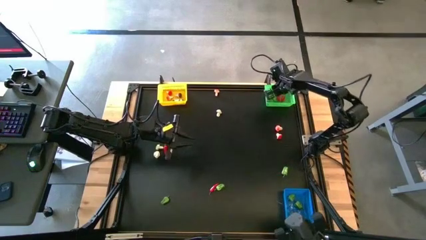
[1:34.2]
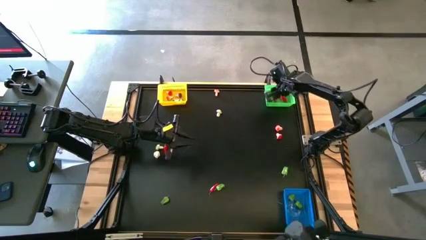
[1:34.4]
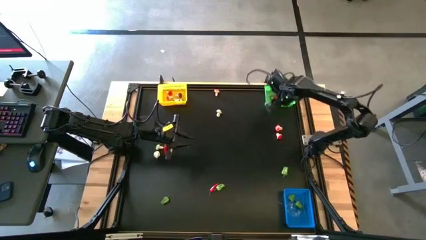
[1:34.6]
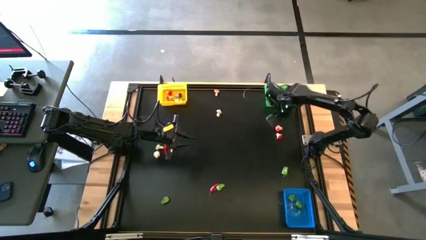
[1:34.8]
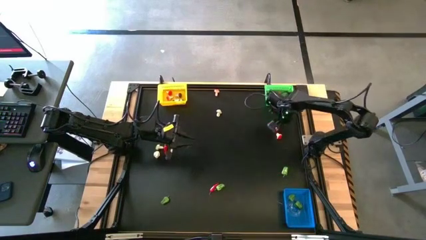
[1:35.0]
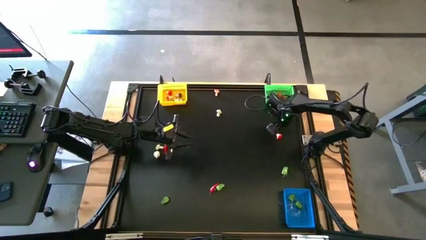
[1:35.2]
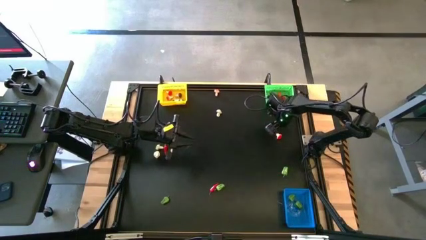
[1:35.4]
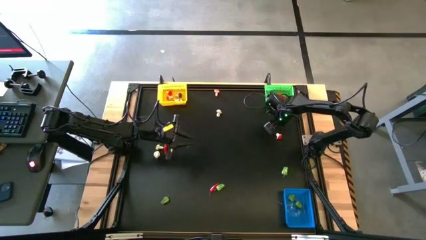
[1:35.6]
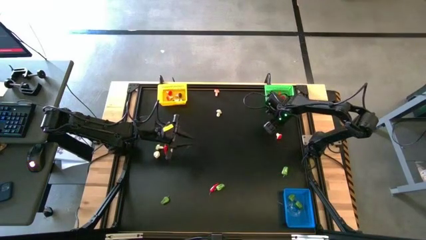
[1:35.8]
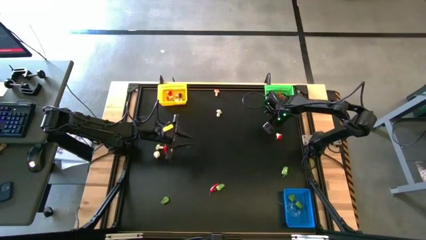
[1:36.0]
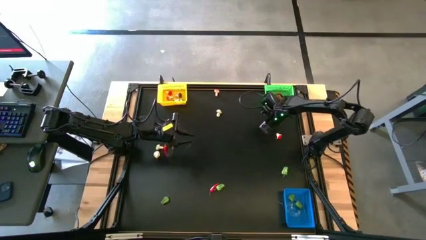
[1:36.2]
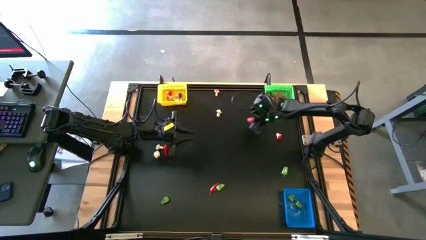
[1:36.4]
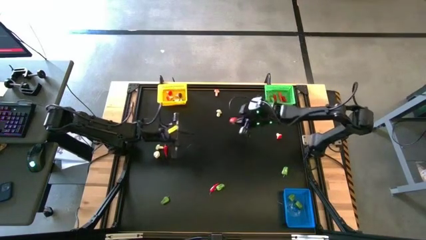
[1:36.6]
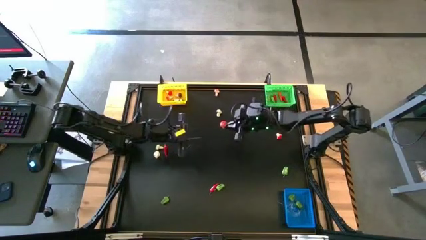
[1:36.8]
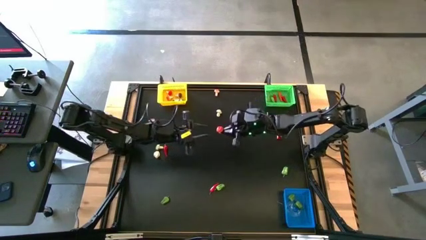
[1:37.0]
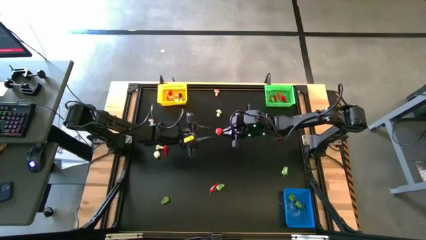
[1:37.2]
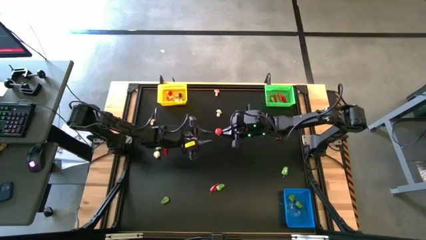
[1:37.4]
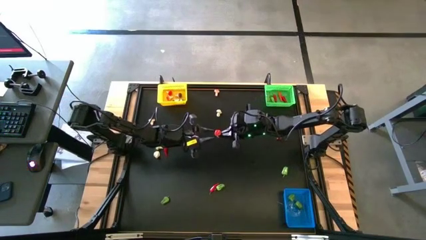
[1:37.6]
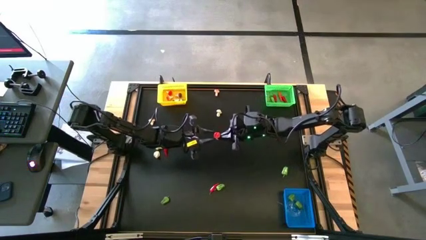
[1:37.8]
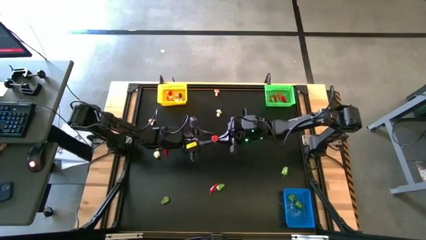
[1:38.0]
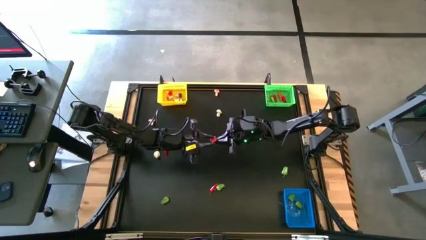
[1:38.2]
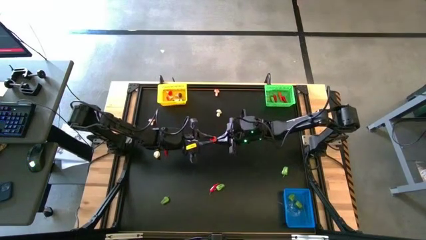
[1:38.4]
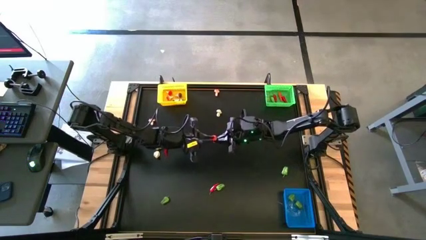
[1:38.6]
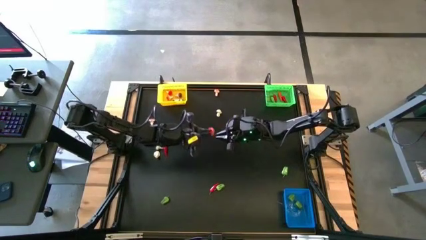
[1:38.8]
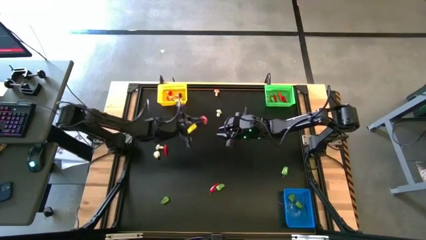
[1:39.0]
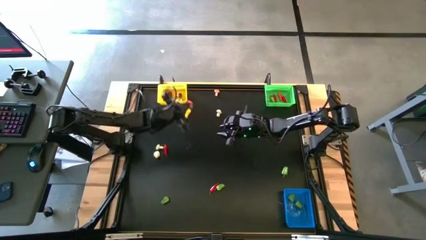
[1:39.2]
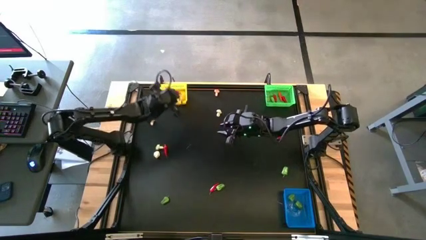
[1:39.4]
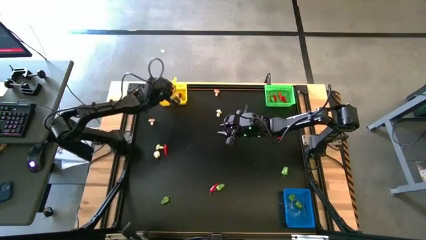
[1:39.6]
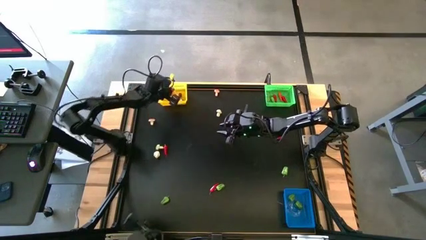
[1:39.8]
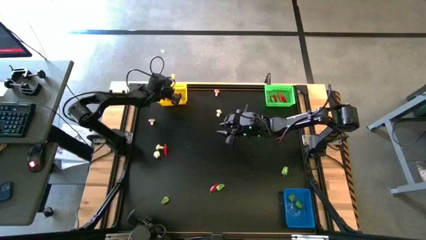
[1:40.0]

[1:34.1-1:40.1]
Task: Sort produce into baskets
Put the brown mushroom into the yellow bin

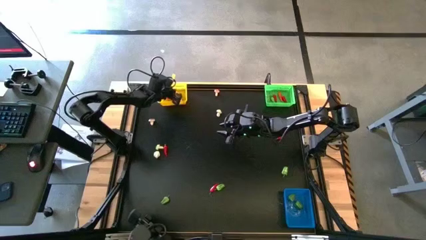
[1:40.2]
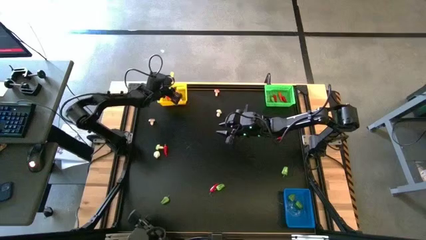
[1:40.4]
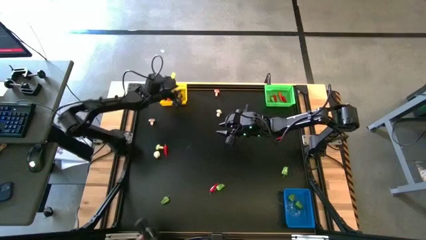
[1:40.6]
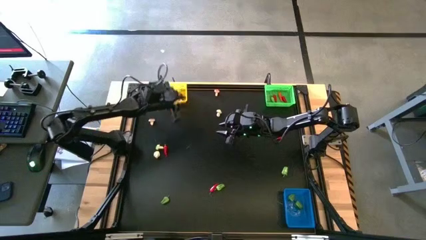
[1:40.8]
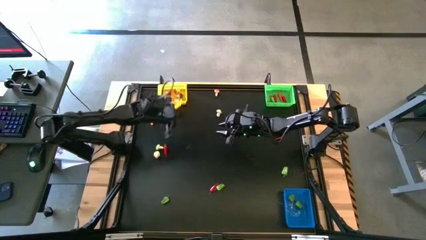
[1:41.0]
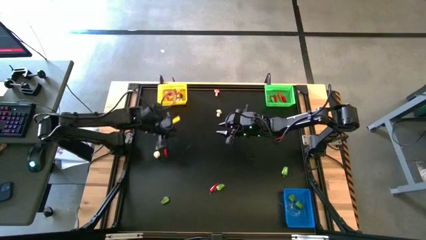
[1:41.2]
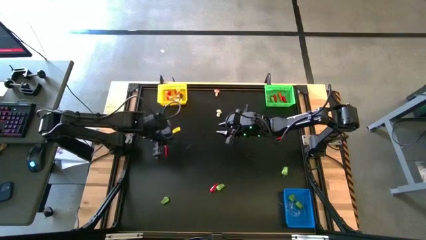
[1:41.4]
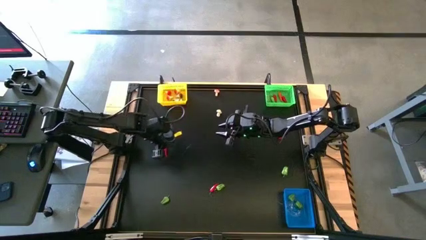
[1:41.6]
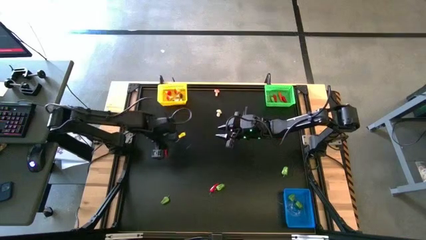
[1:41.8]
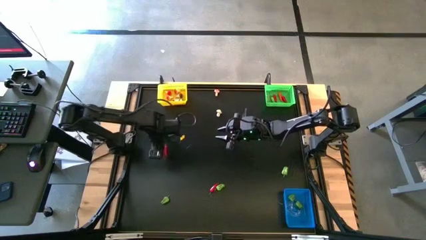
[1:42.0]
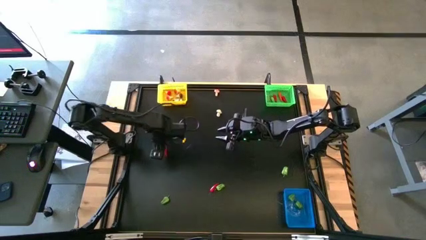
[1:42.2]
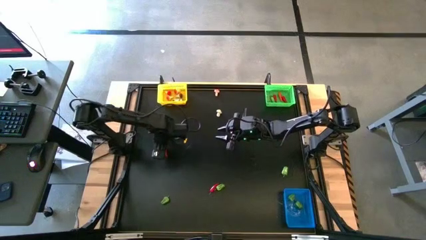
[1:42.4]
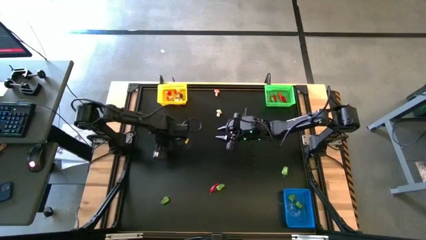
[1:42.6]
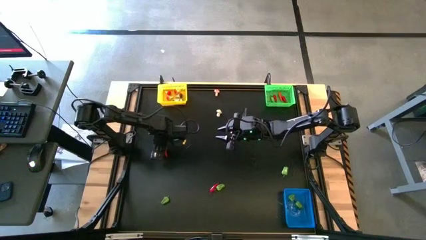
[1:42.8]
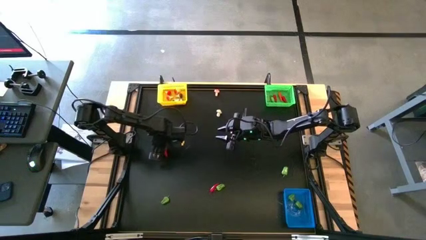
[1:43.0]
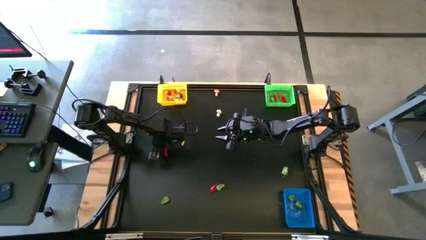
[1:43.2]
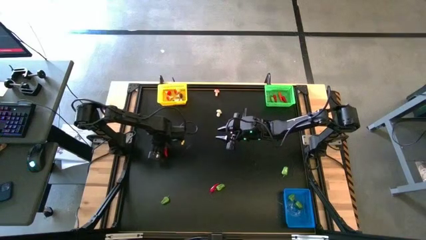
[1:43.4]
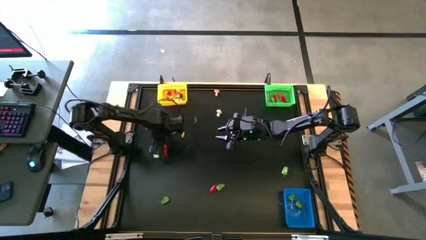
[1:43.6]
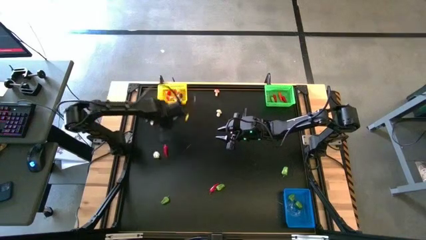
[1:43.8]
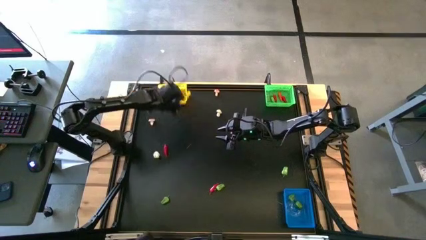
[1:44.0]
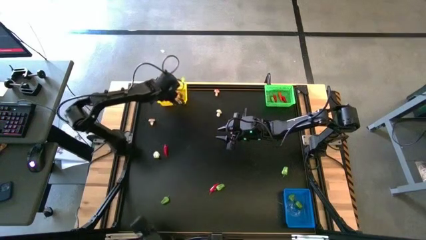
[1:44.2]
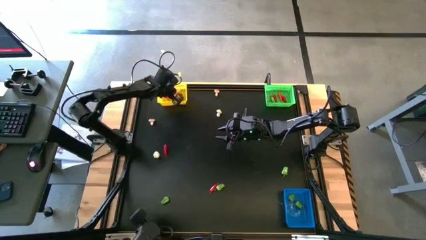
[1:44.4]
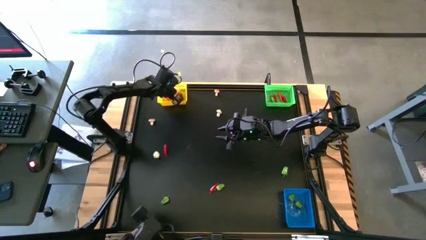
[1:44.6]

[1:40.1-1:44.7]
Put the green mushroom into the yellow bin

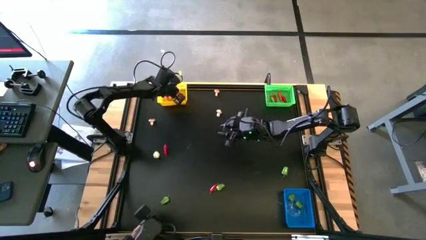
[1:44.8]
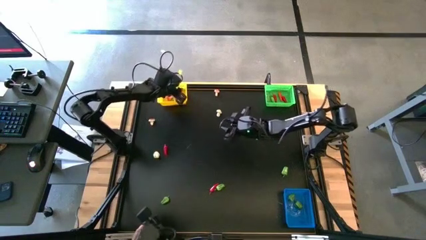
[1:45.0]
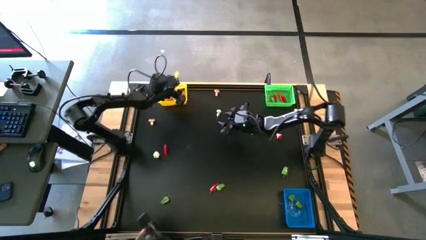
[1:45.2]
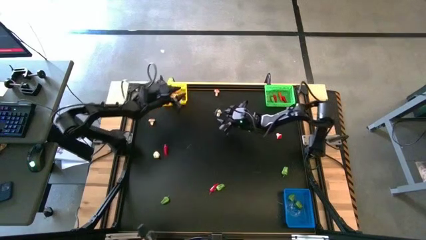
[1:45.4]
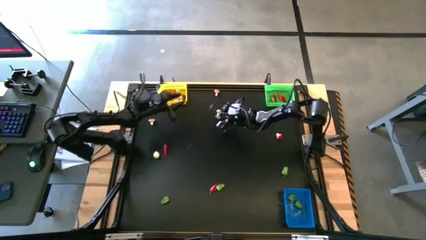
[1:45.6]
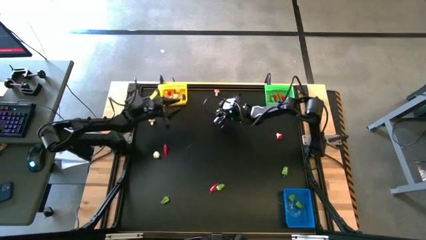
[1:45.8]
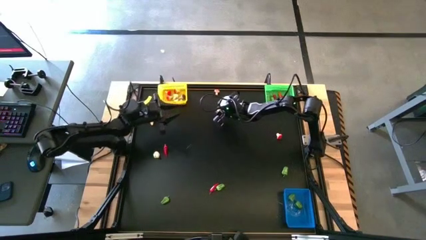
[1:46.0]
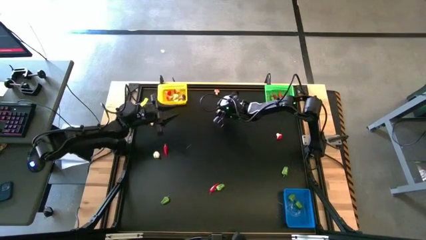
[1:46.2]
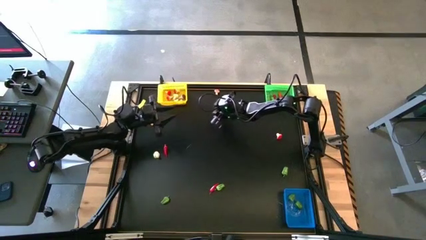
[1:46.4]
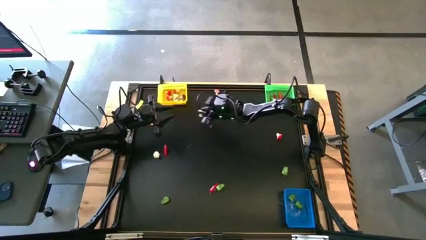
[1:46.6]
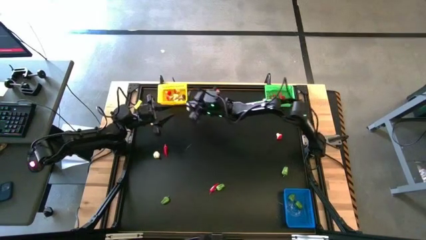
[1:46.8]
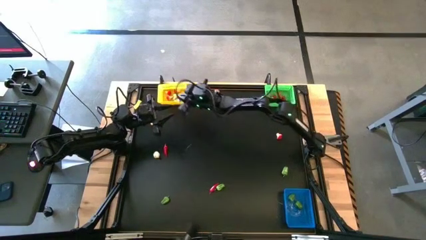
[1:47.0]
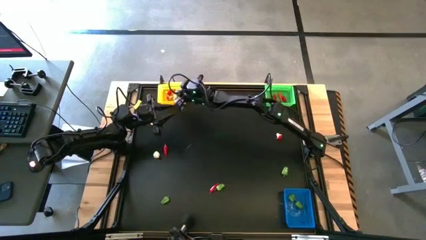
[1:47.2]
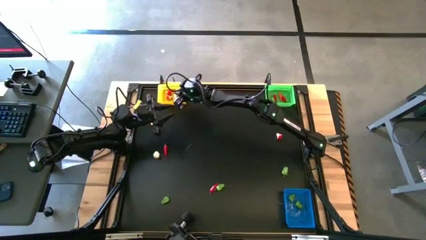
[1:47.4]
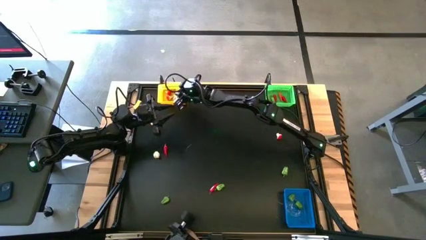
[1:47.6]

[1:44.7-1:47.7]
Put the green mushroom into the yellow bin

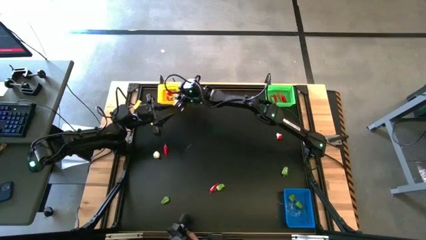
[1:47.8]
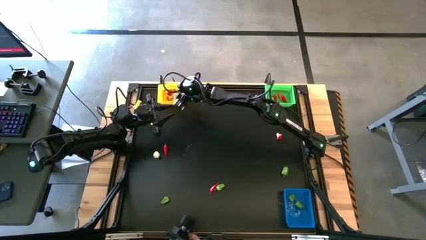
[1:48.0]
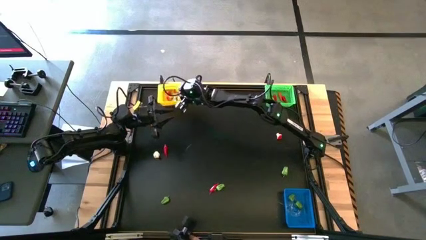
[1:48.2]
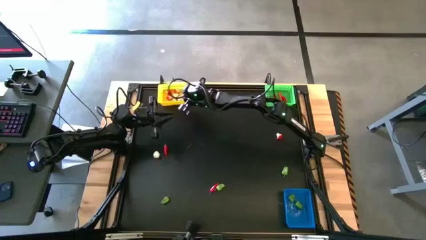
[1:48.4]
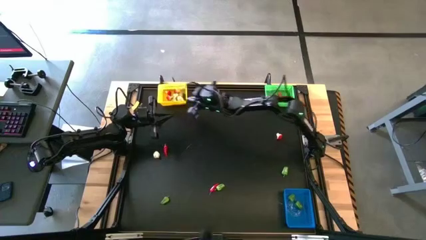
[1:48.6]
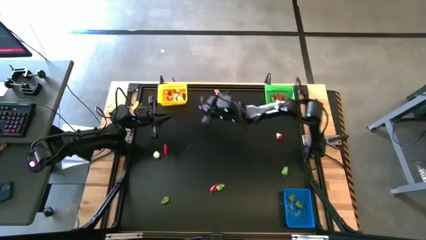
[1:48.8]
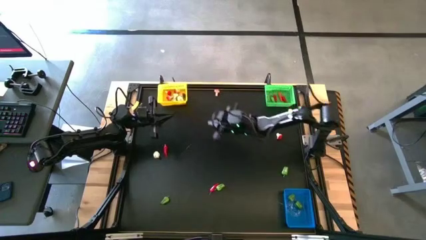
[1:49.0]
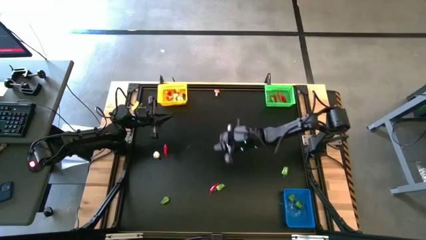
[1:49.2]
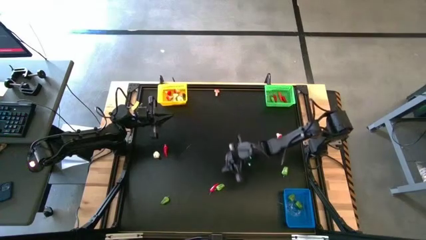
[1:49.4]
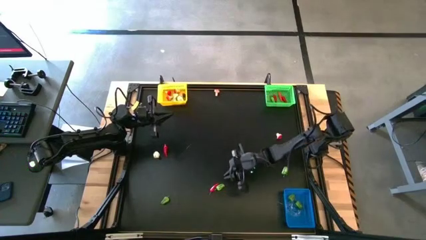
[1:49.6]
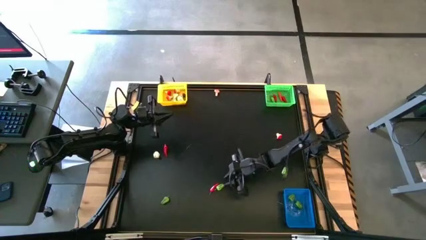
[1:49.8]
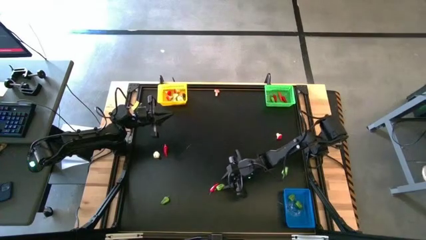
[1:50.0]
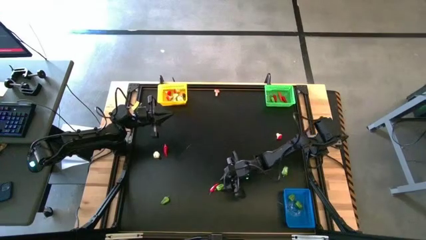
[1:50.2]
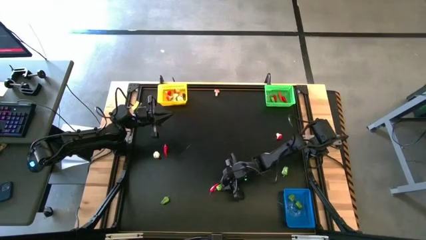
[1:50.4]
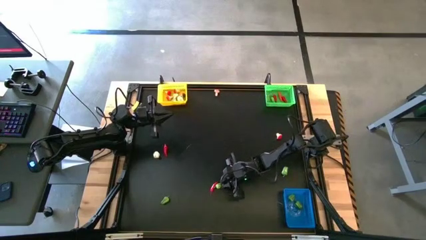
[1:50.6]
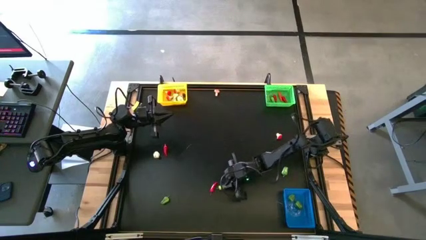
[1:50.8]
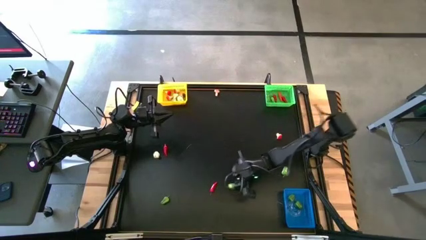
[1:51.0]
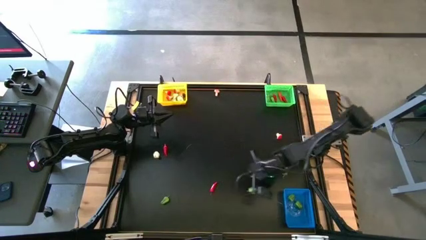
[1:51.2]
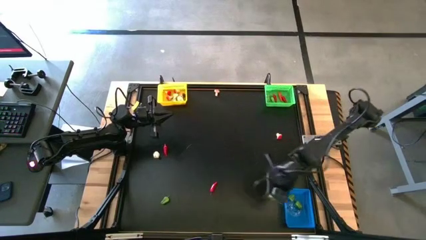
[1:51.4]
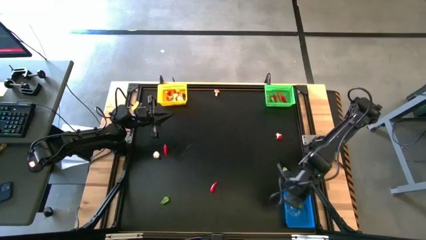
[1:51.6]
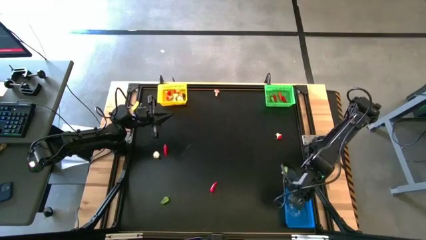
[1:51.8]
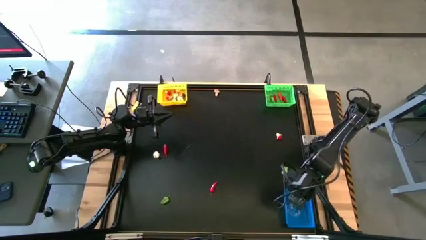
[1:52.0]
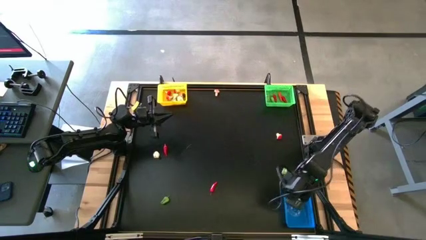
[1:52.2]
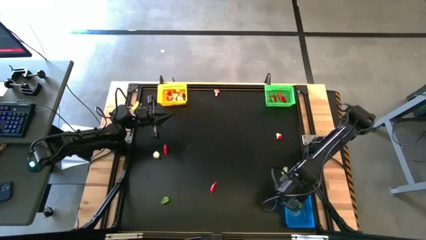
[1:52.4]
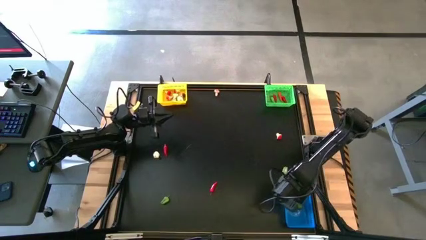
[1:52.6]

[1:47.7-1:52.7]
Put the green bell pepper into the blue bin
